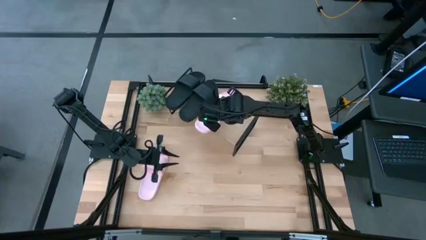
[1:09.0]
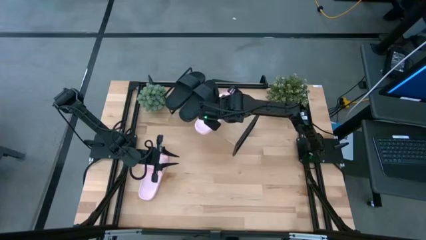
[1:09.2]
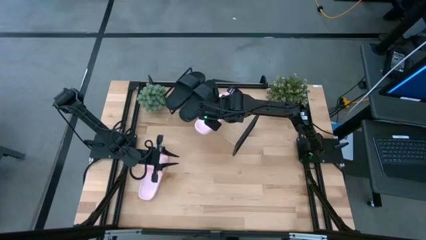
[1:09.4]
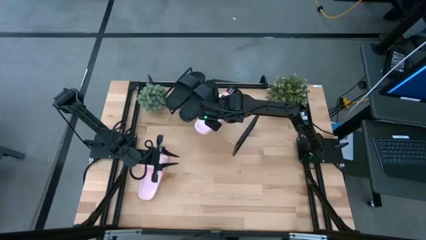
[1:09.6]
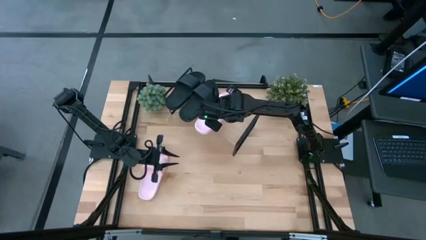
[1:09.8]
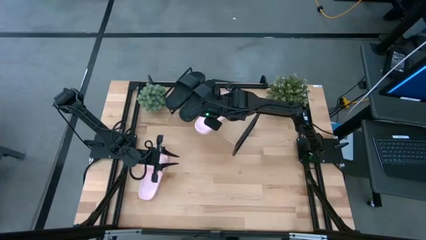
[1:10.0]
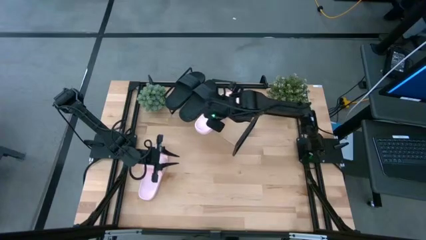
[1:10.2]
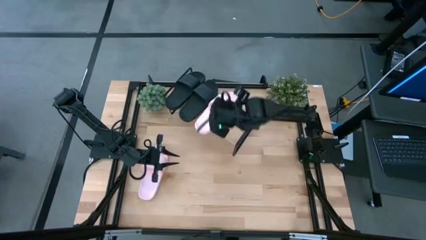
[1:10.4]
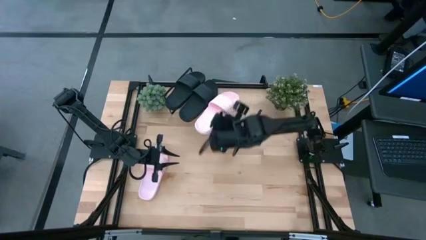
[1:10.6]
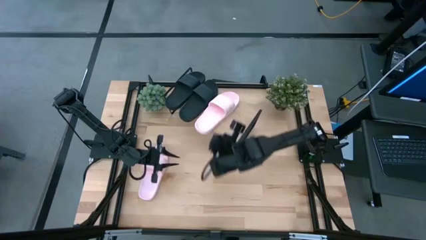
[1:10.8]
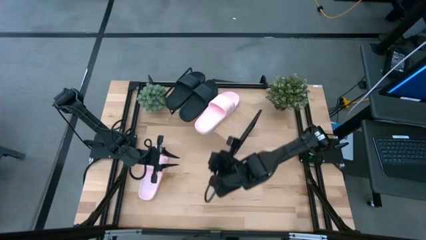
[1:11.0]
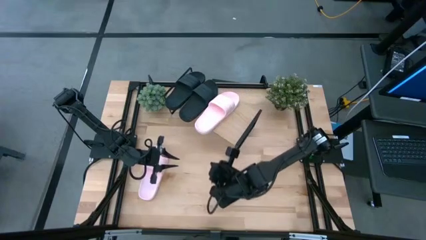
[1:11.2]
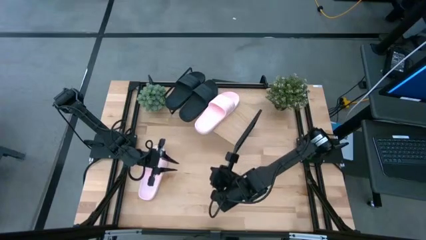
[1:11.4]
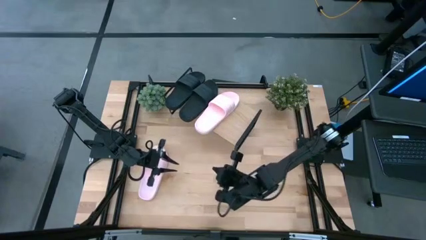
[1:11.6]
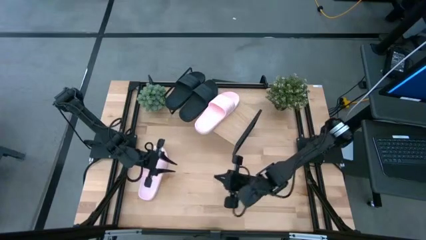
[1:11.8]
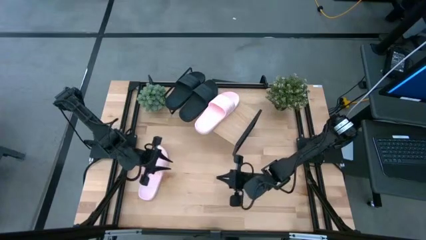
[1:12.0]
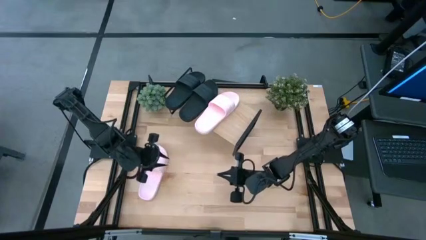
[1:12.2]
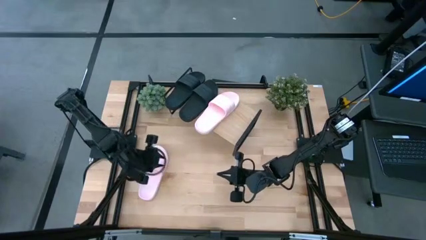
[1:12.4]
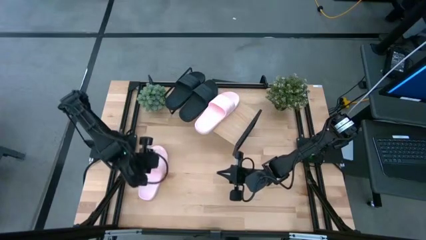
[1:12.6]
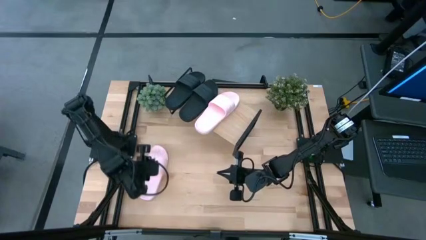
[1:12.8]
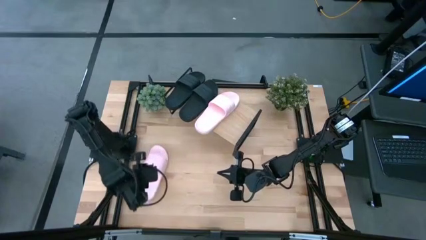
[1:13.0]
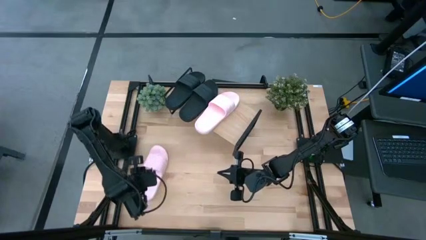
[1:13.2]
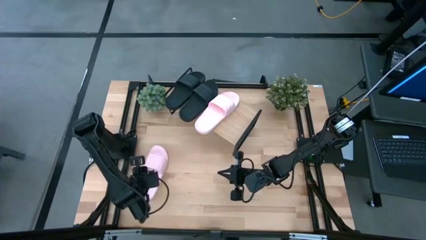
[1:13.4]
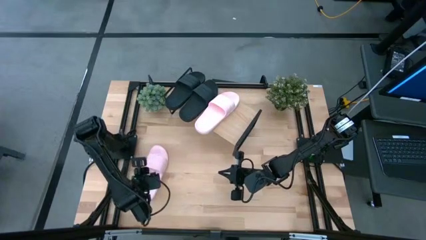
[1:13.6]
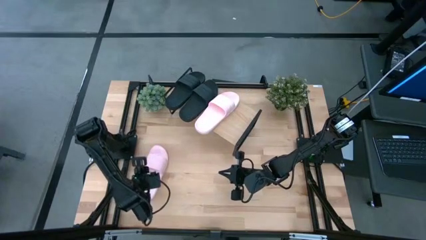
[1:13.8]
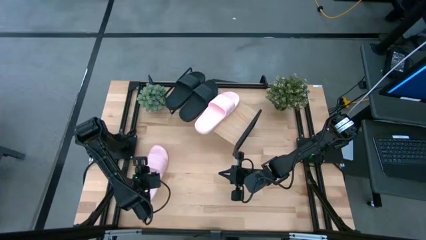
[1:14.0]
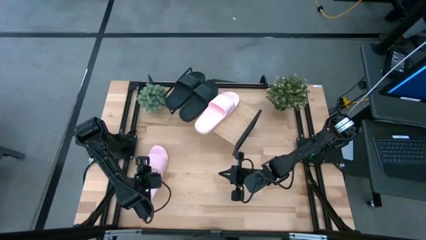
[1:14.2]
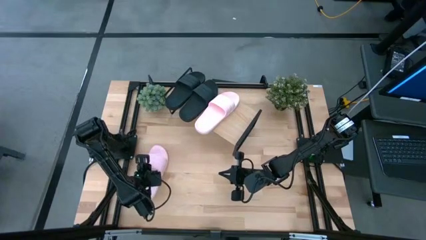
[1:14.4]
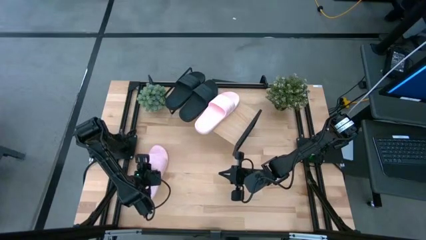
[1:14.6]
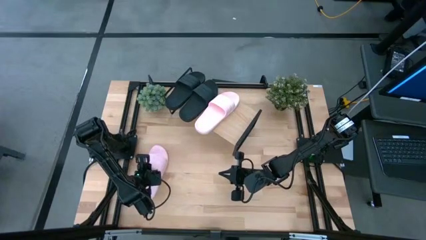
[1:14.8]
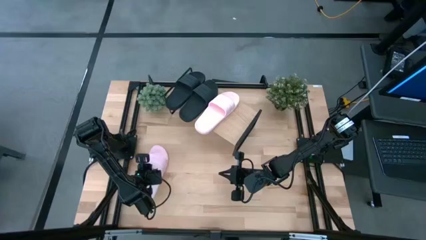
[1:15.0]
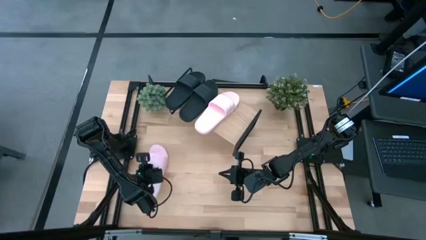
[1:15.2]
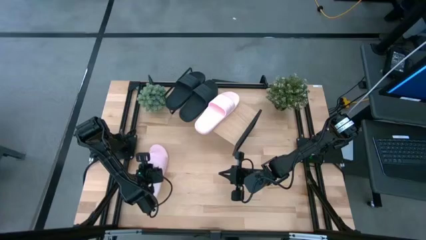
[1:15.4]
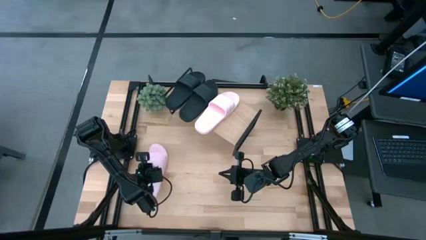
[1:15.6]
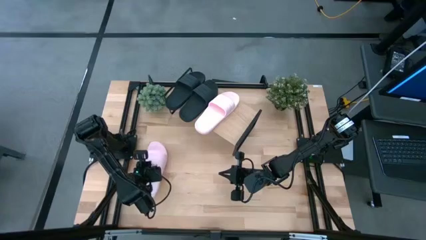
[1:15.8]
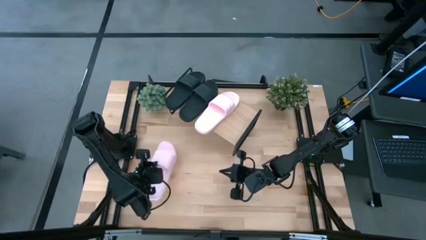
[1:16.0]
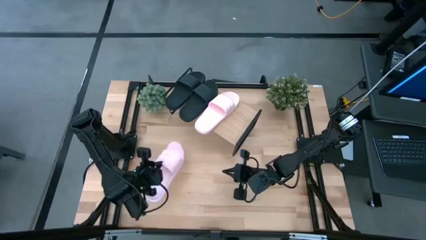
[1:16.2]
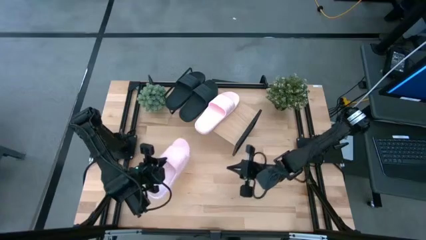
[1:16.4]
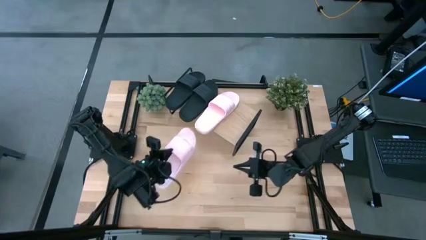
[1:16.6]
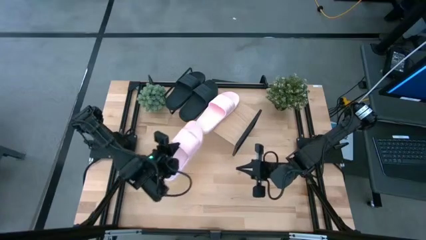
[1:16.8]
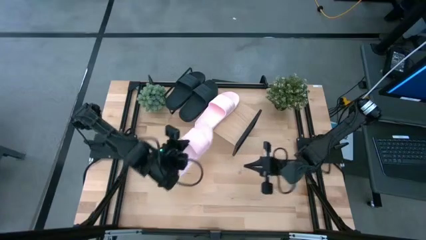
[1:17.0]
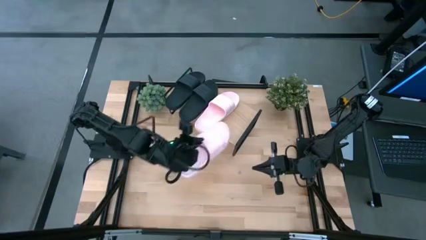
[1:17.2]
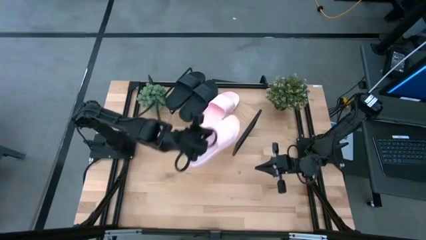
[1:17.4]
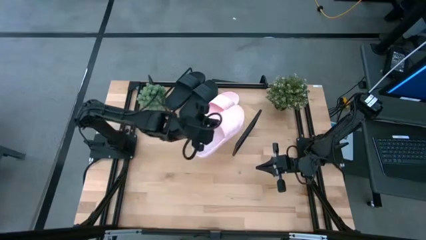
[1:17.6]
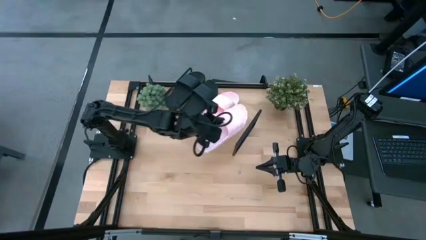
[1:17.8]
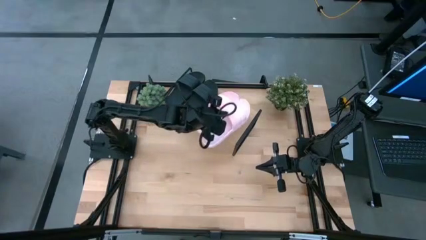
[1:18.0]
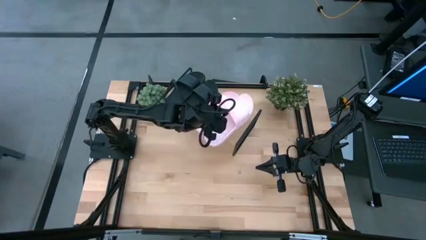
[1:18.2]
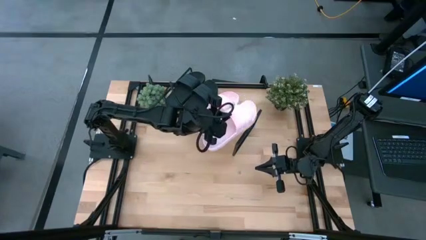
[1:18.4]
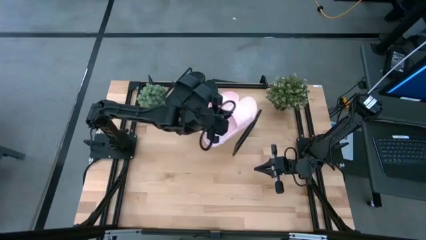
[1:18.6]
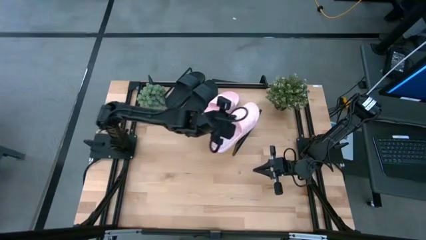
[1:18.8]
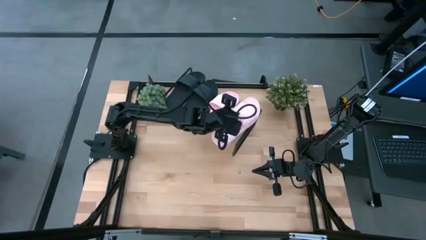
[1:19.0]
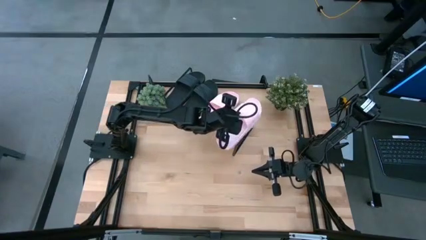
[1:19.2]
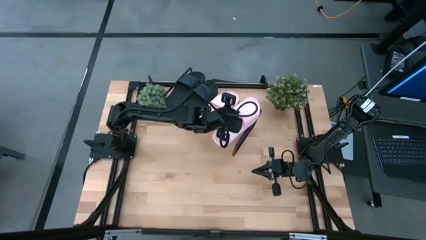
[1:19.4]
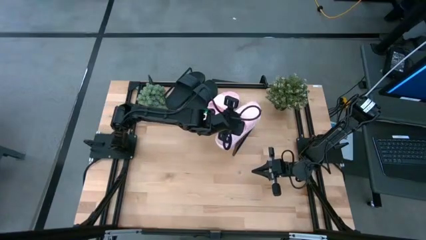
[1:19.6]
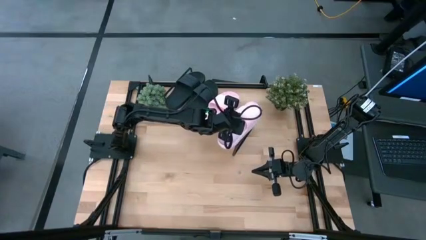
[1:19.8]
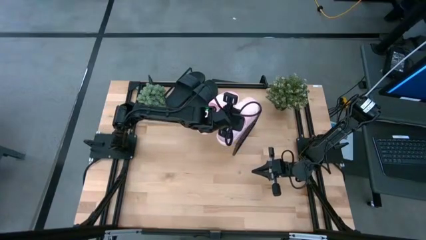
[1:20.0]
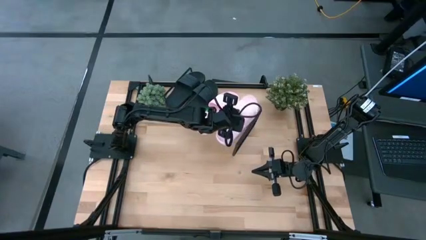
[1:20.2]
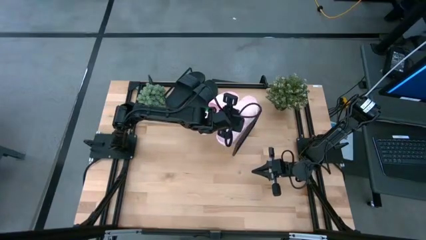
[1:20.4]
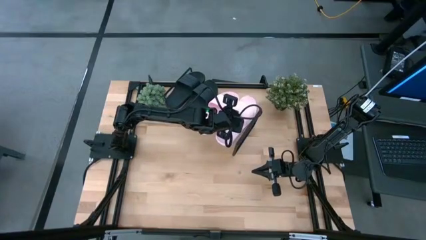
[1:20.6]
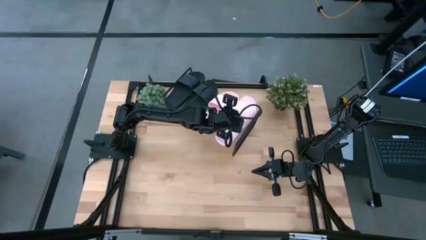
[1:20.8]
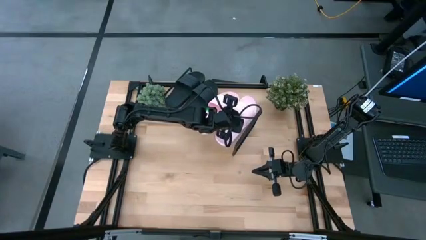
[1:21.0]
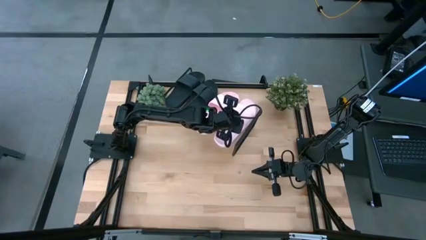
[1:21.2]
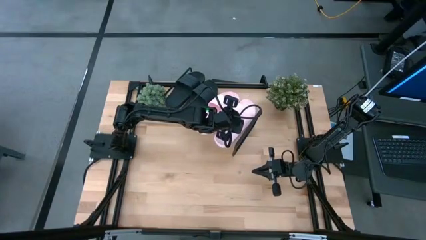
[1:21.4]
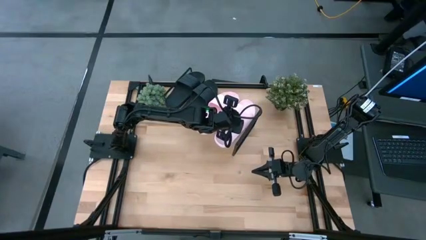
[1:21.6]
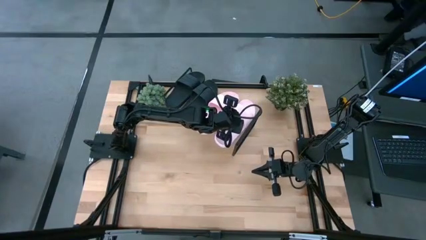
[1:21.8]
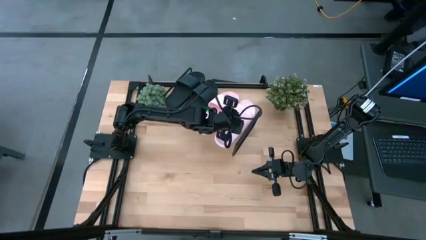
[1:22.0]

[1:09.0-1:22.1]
Task: Pick and place slides into the shelf
Put the pink slide on the shelf
